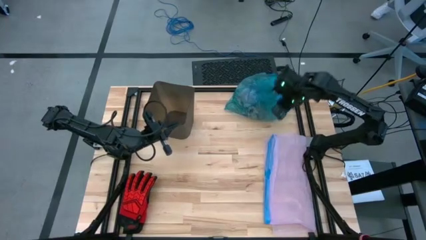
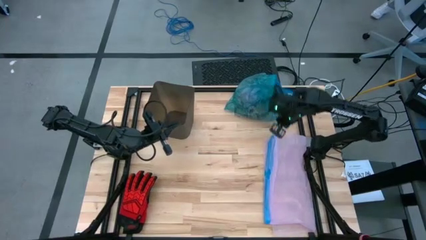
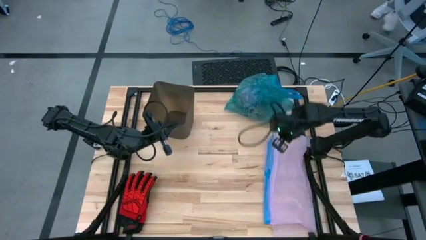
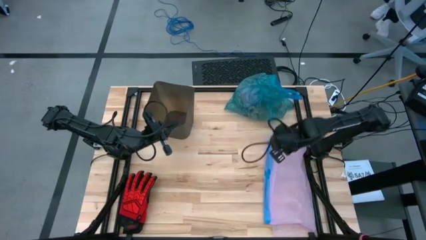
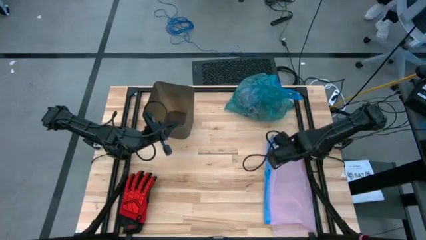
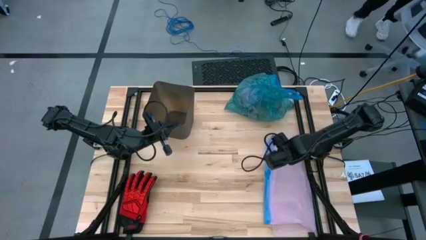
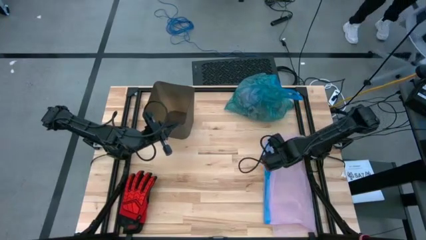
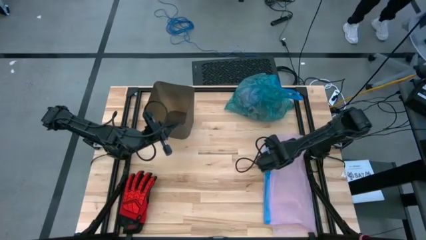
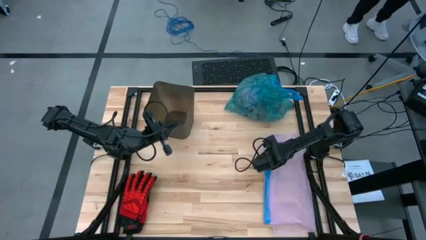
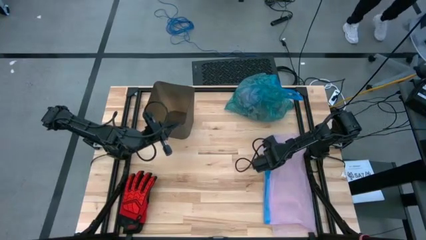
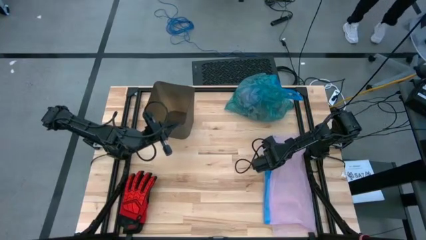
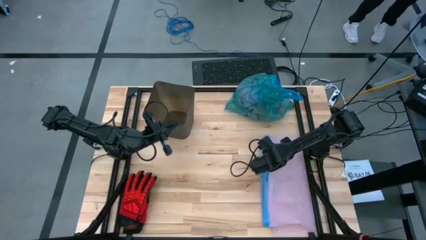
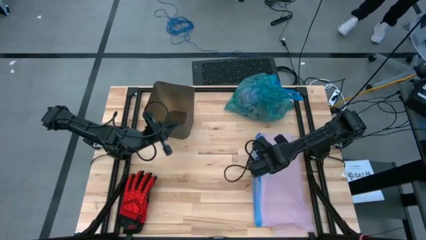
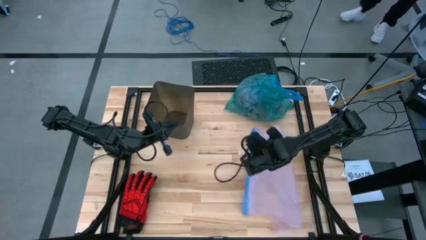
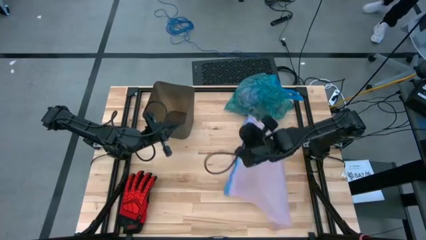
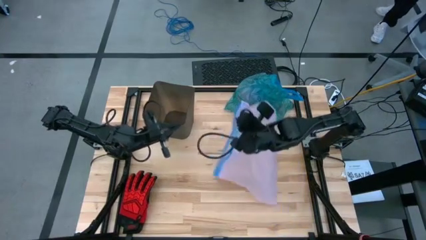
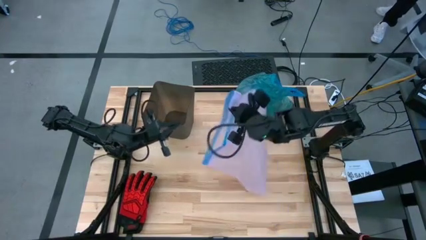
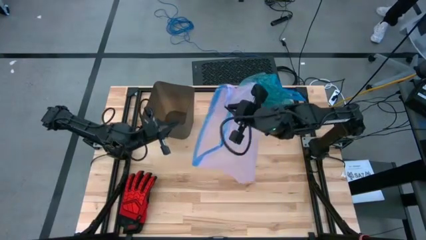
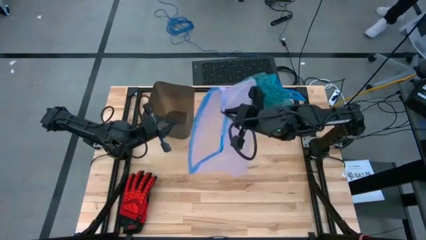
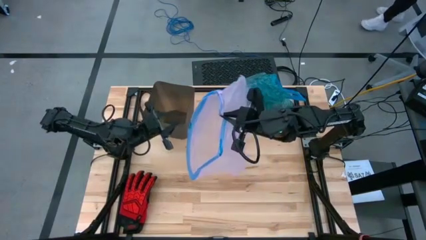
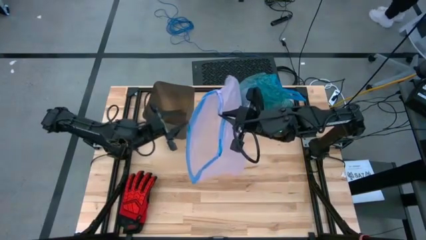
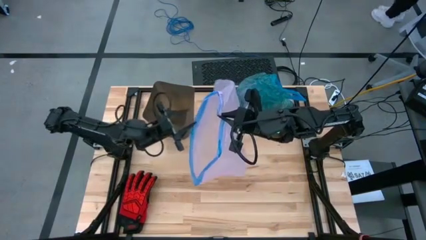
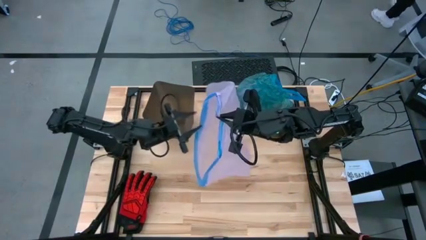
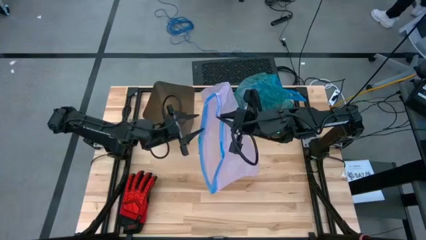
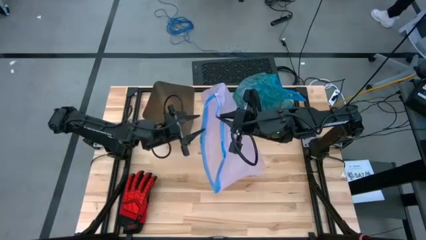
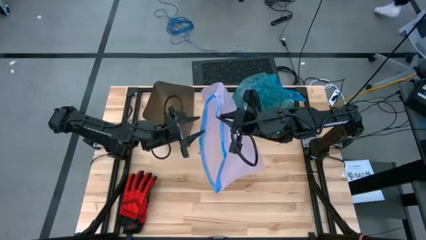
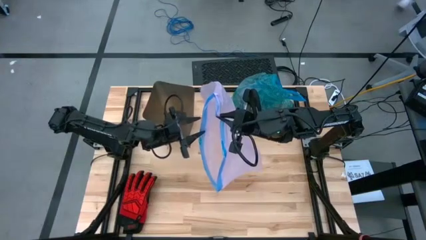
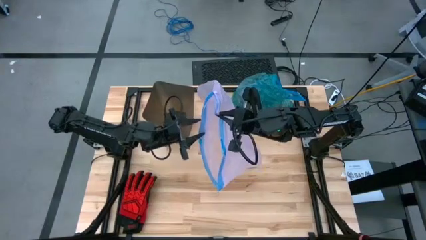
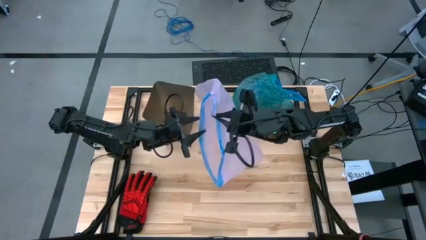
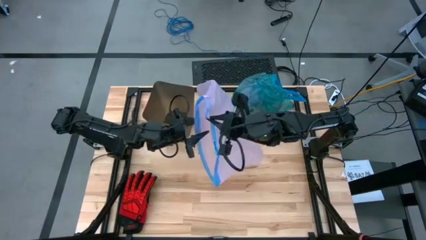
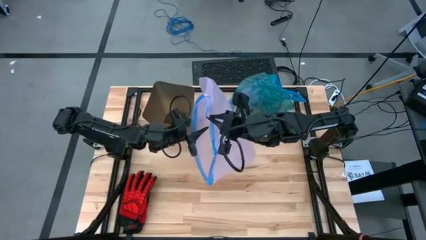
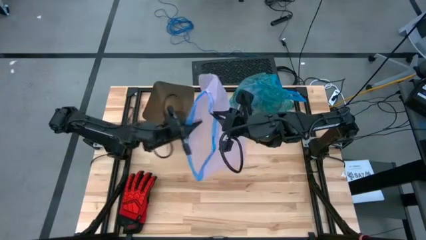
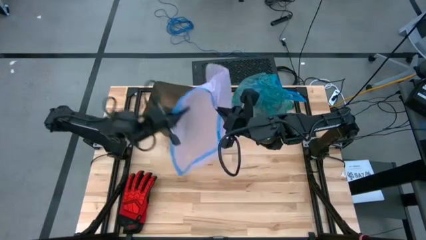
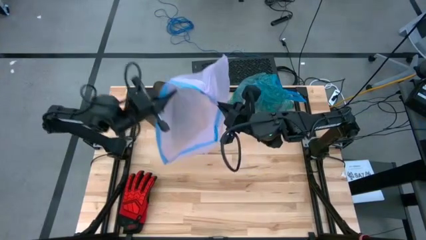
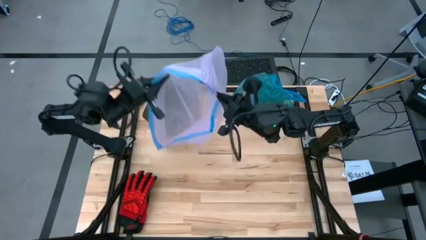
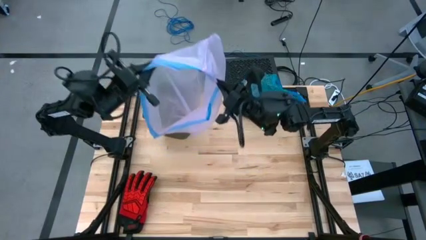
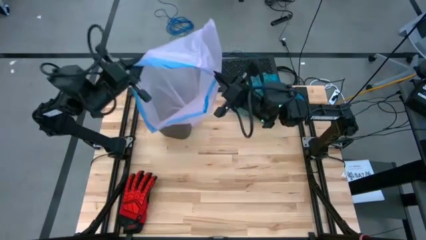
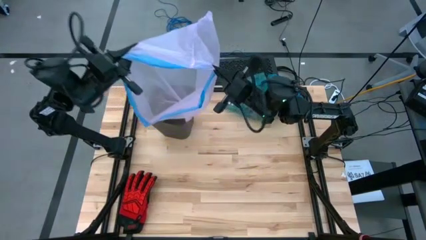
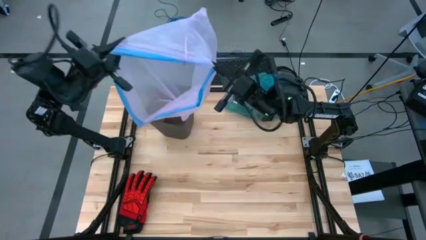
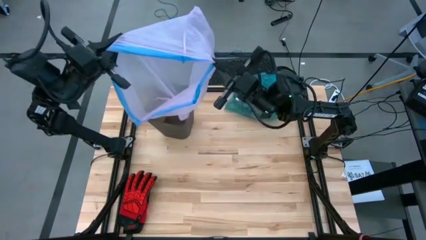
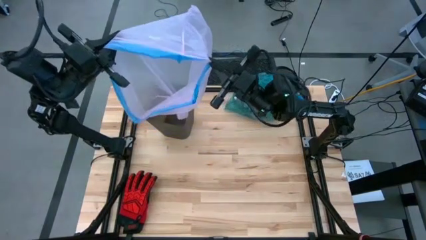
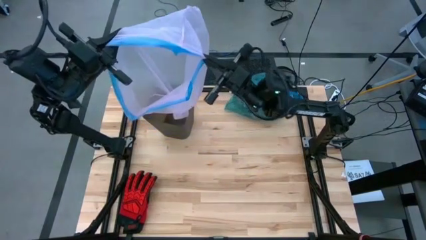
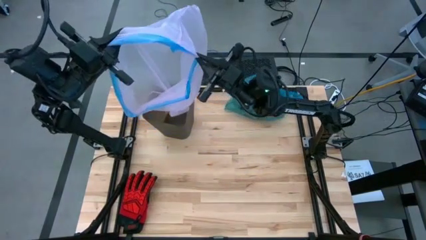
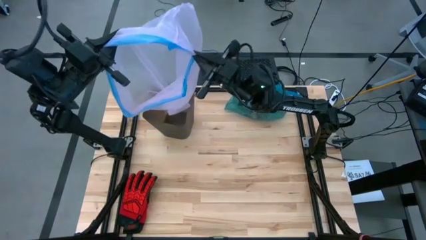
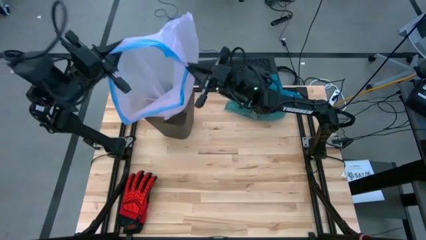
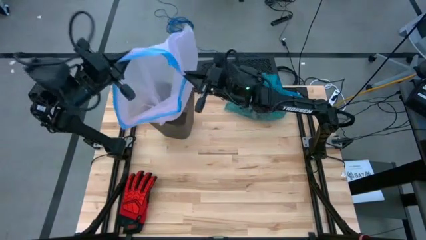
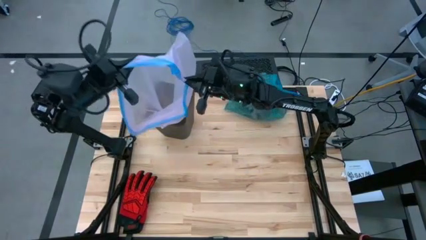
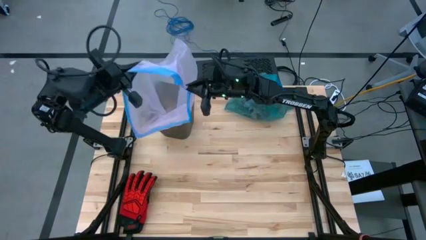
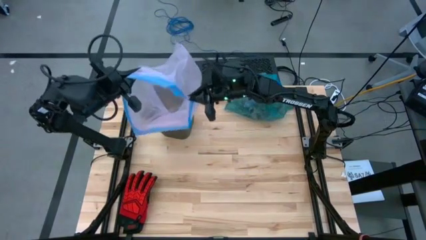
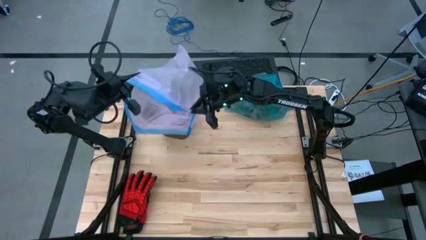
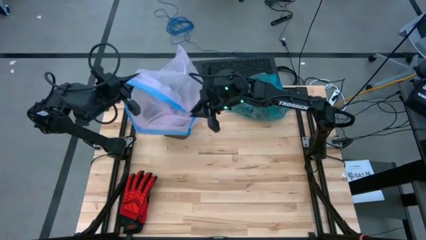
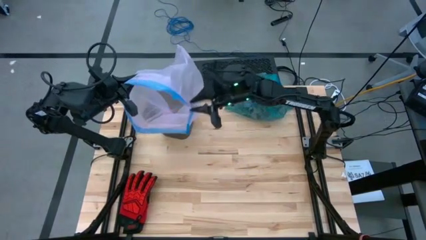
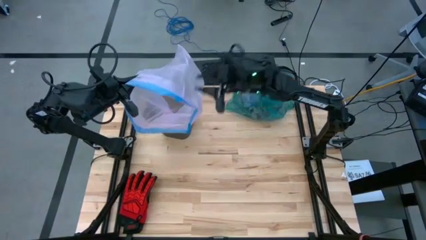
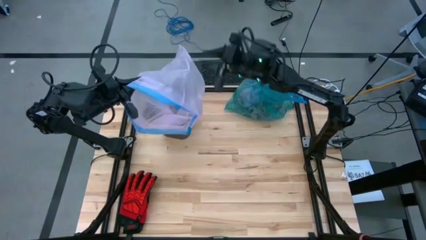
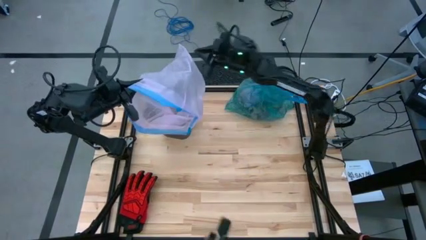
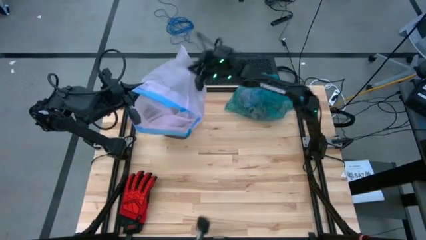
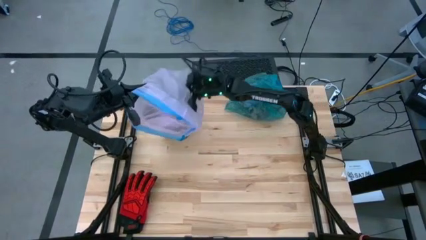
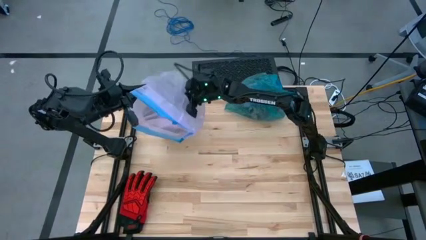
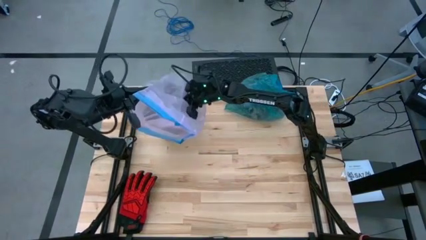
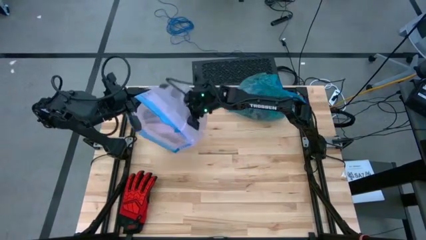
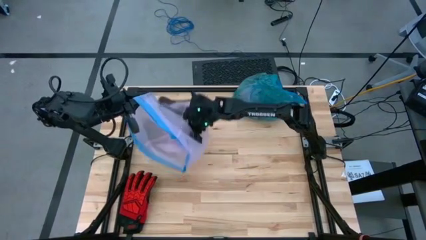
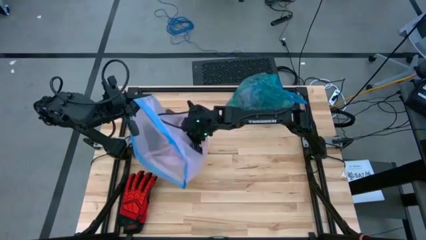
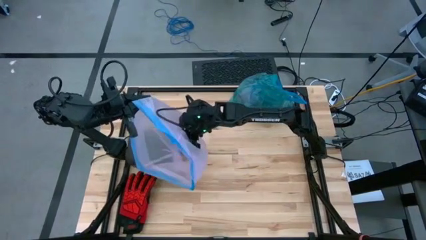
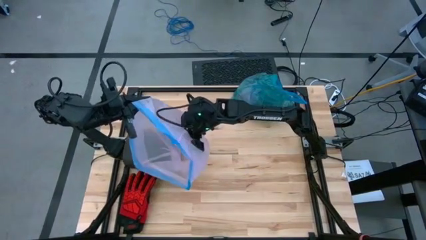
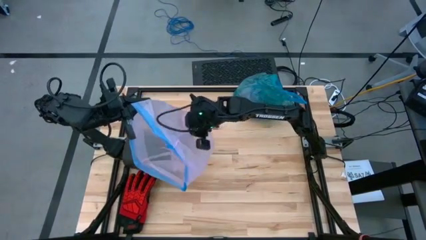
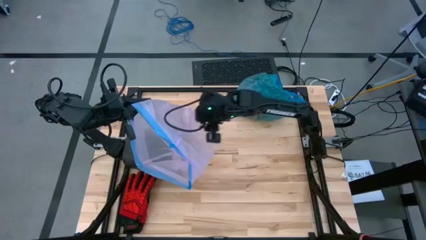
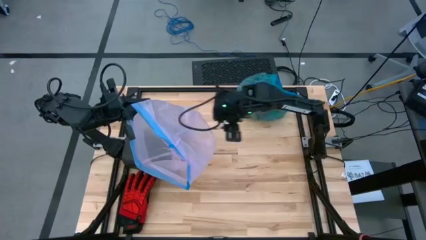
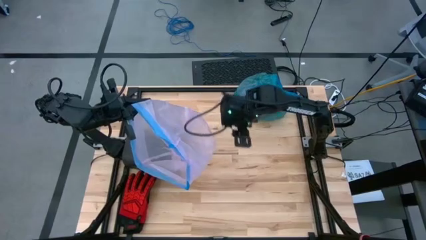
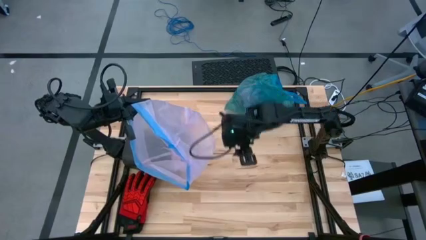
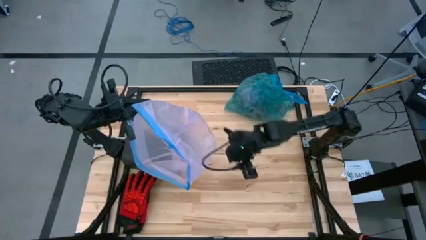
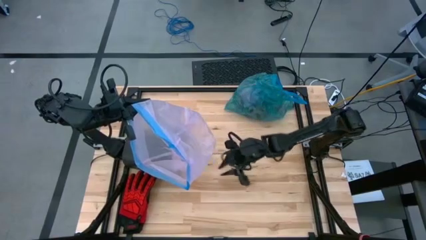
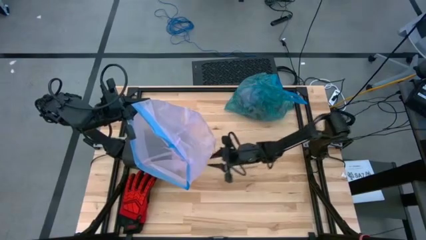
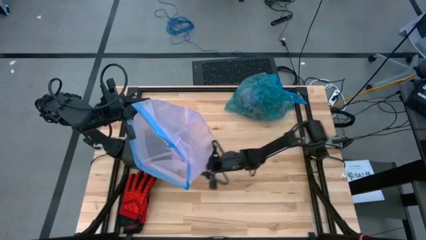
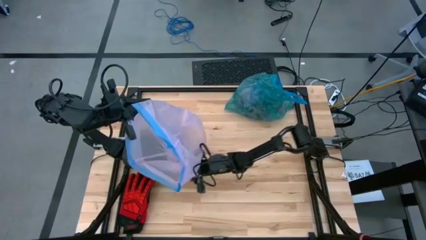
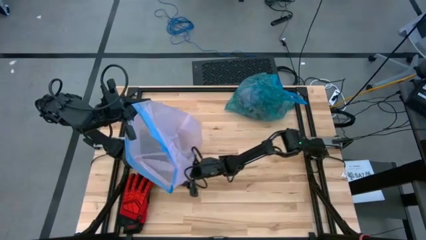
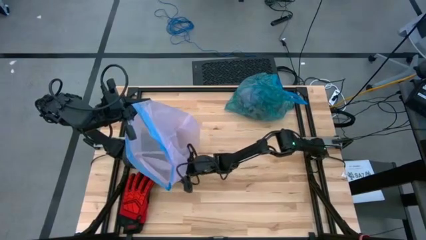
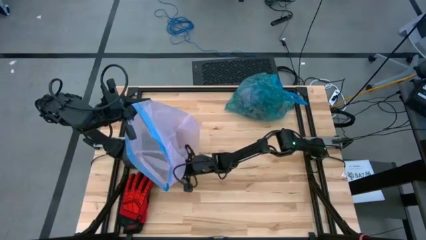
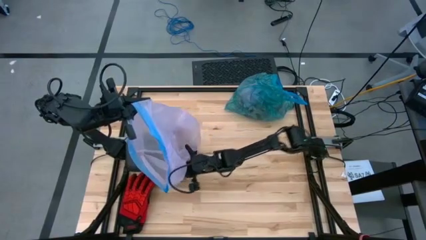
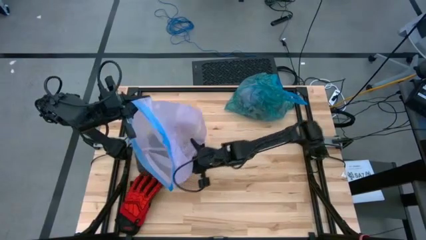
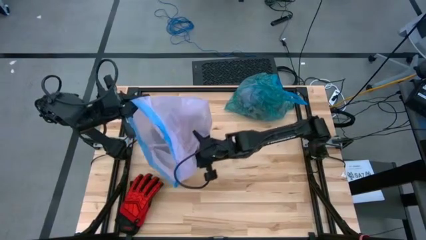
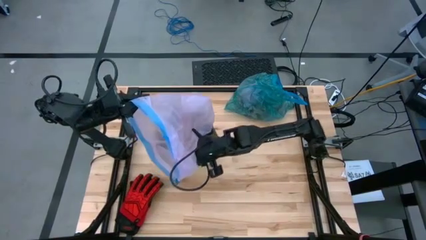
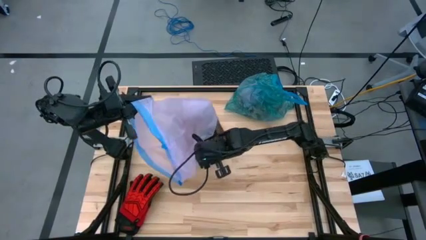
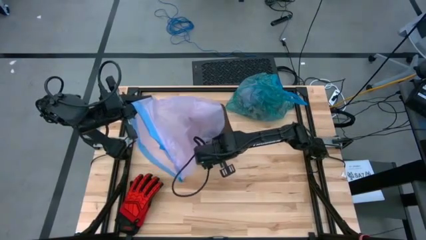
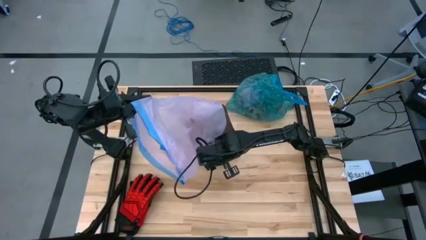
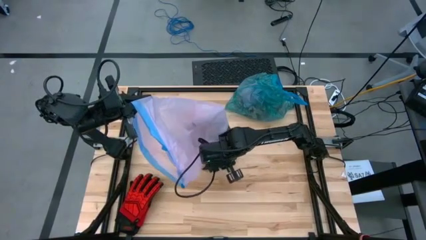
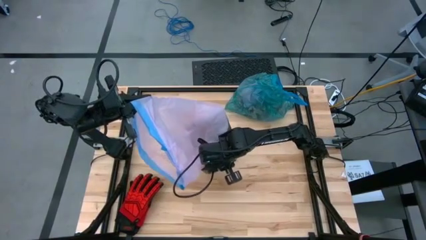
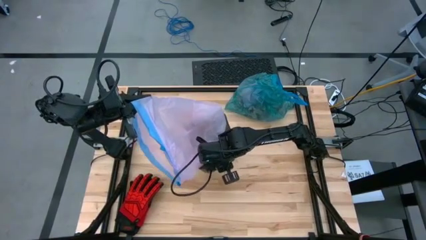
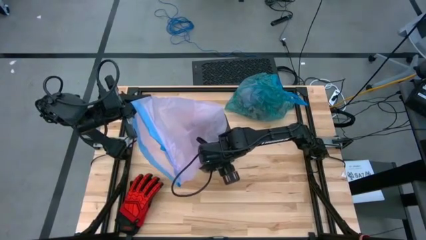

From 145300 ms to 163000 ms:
Task: place trash/remove bag and relplace
Put the pink trash bag into the trash bin
